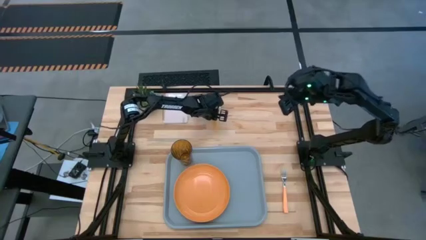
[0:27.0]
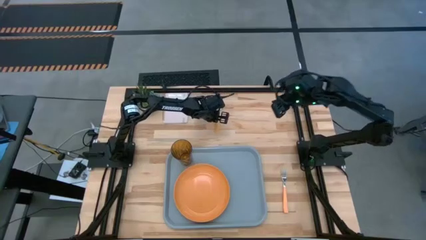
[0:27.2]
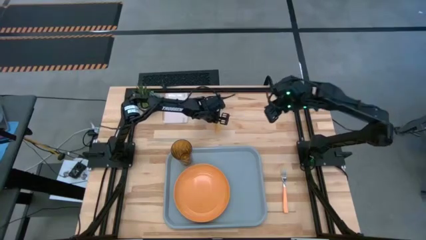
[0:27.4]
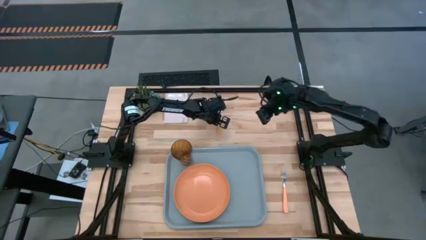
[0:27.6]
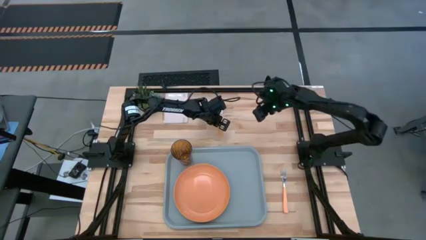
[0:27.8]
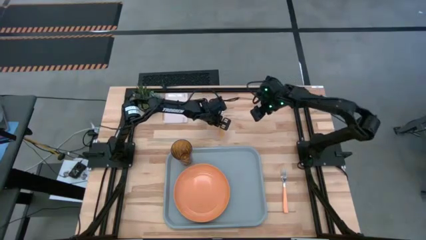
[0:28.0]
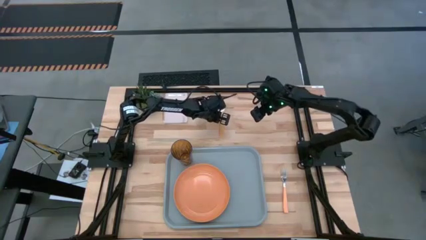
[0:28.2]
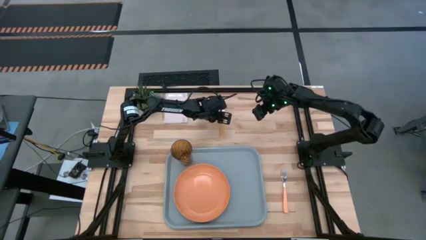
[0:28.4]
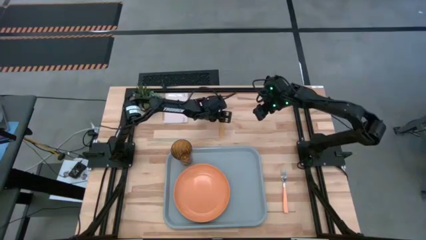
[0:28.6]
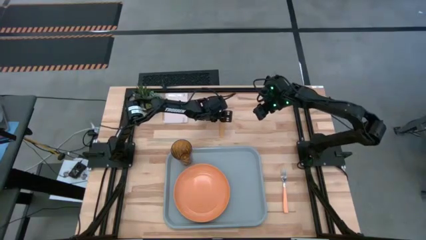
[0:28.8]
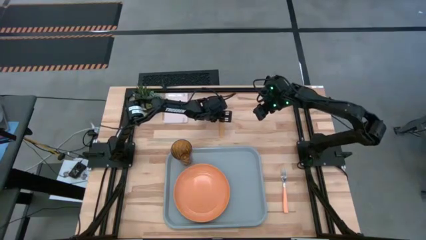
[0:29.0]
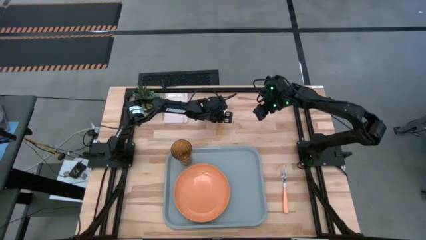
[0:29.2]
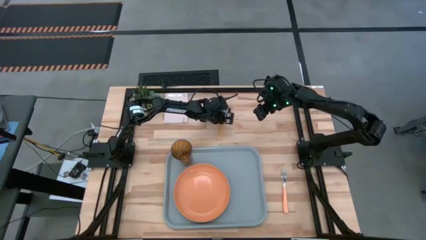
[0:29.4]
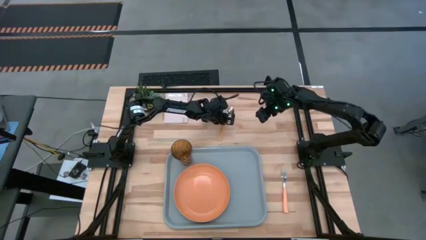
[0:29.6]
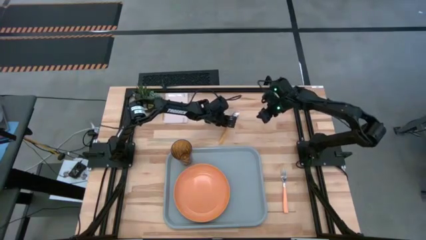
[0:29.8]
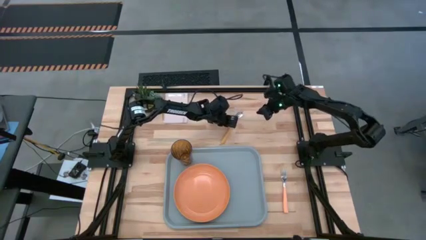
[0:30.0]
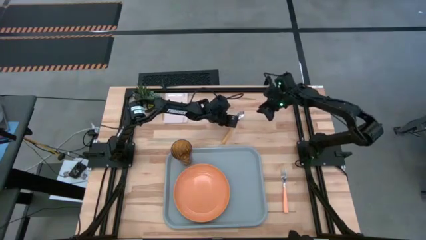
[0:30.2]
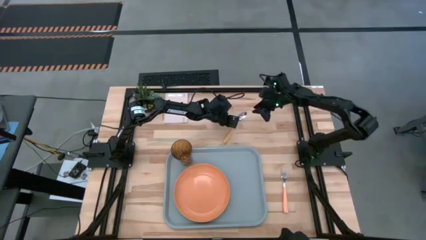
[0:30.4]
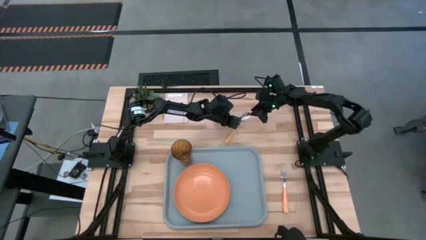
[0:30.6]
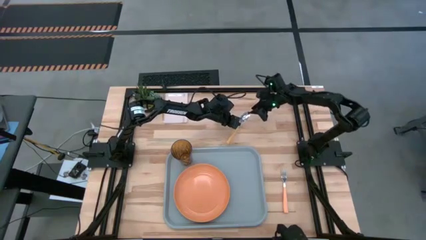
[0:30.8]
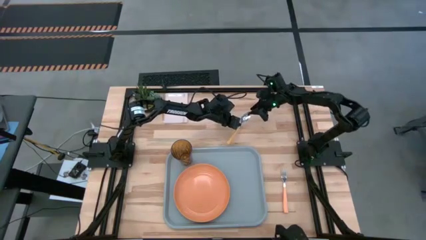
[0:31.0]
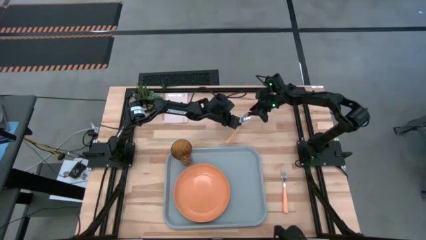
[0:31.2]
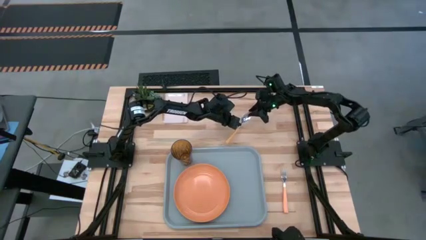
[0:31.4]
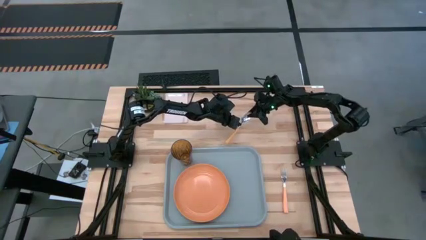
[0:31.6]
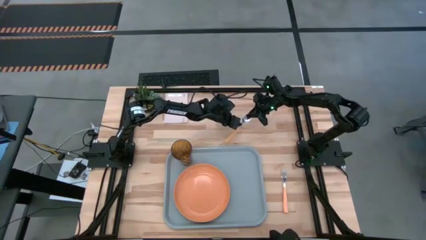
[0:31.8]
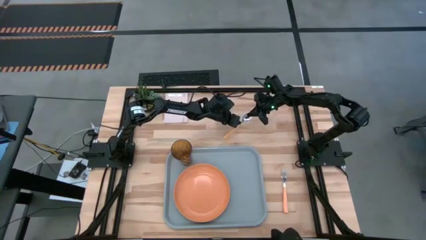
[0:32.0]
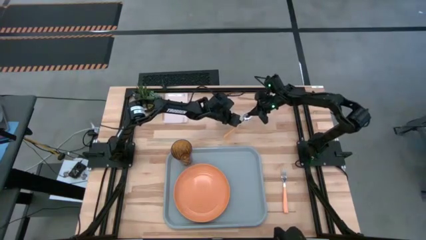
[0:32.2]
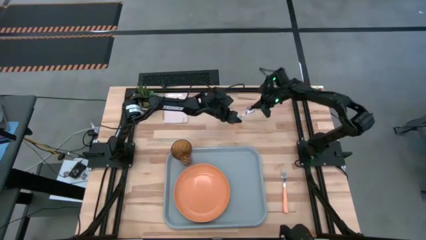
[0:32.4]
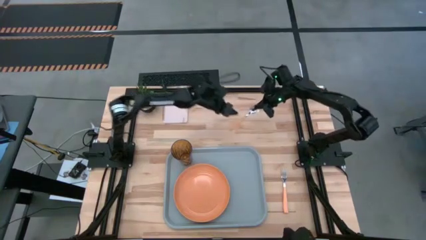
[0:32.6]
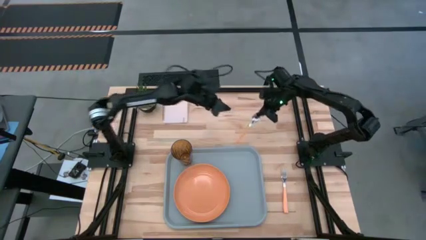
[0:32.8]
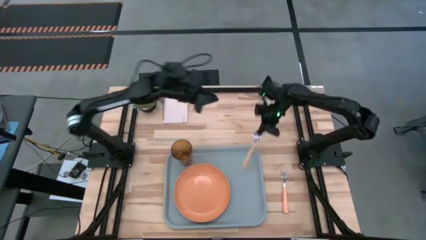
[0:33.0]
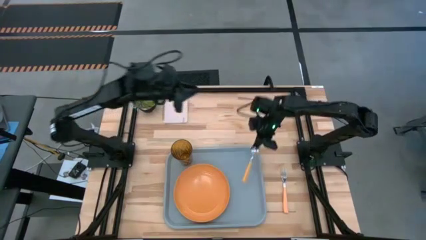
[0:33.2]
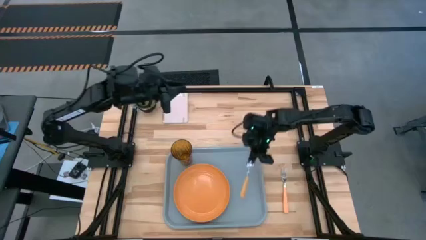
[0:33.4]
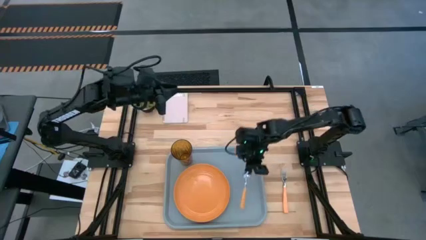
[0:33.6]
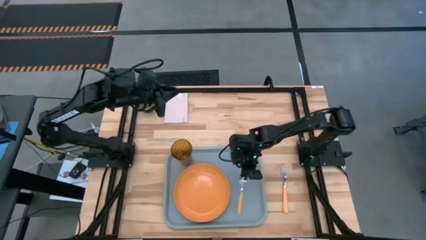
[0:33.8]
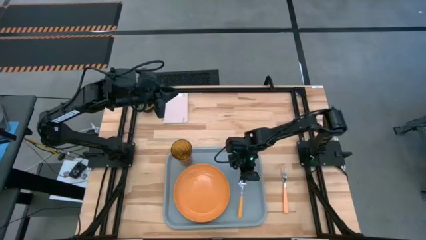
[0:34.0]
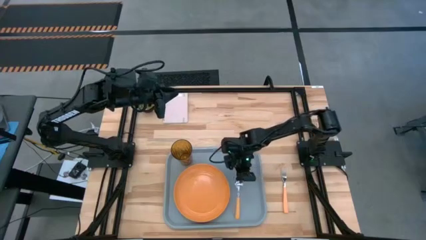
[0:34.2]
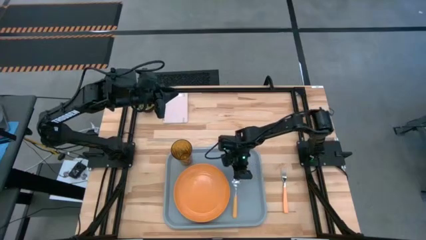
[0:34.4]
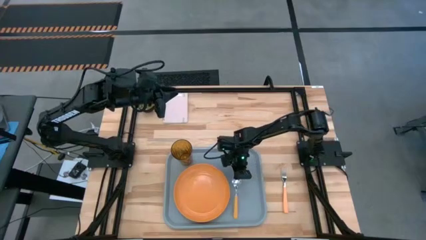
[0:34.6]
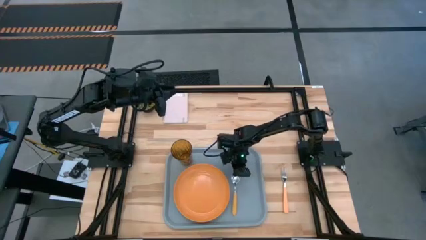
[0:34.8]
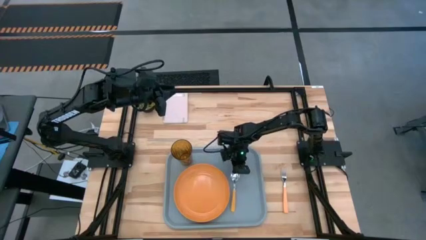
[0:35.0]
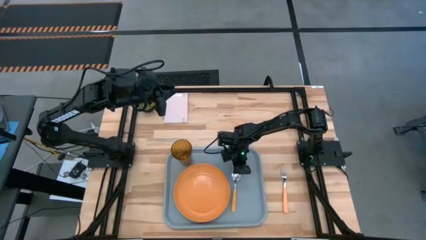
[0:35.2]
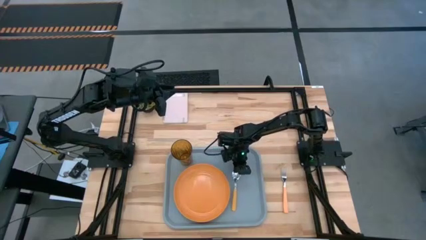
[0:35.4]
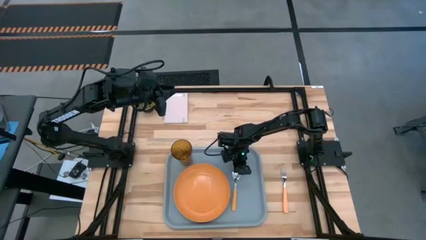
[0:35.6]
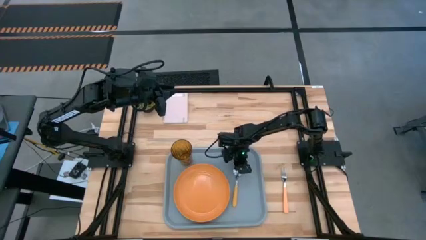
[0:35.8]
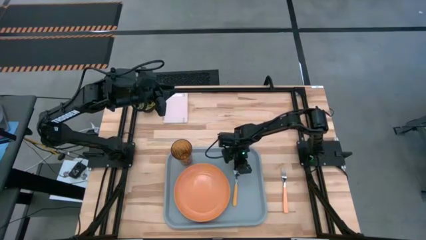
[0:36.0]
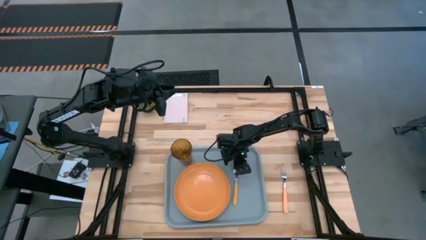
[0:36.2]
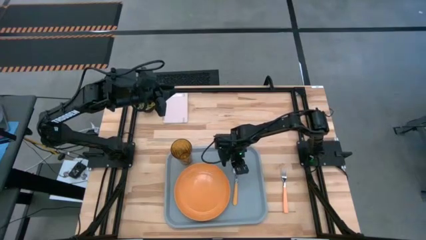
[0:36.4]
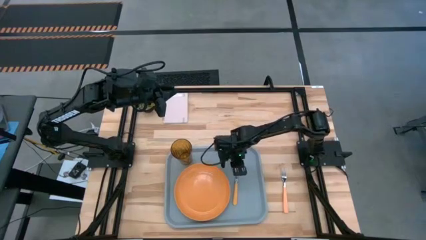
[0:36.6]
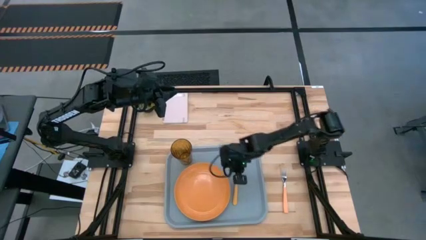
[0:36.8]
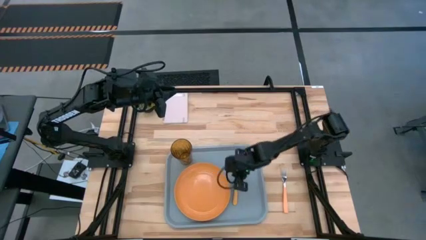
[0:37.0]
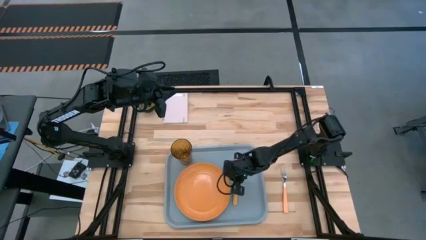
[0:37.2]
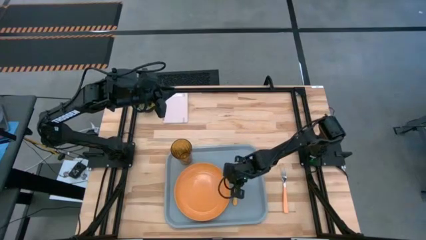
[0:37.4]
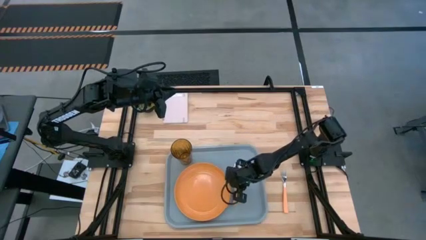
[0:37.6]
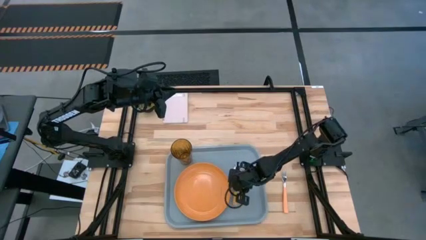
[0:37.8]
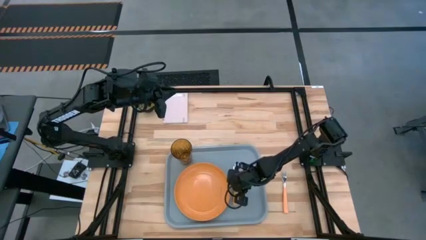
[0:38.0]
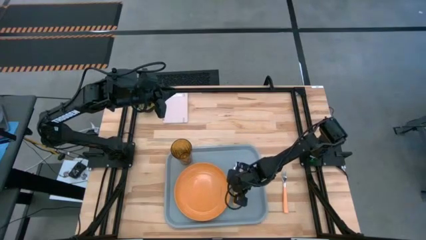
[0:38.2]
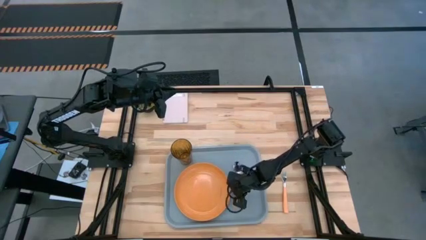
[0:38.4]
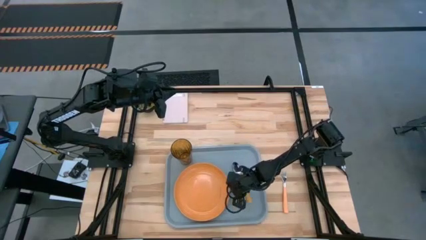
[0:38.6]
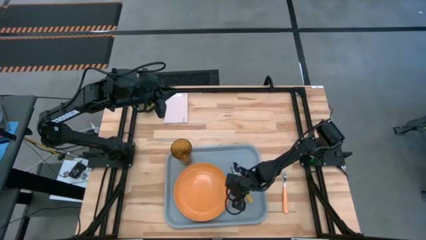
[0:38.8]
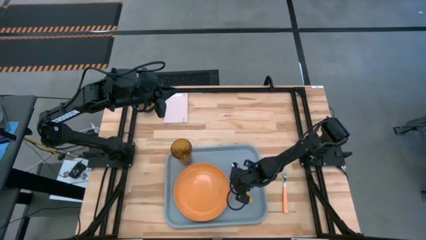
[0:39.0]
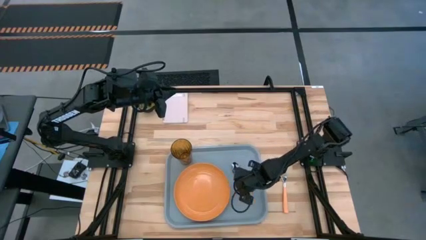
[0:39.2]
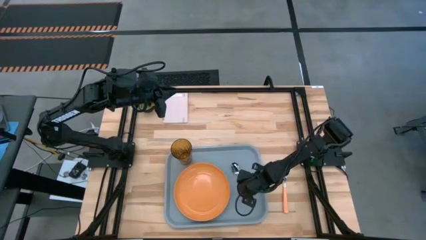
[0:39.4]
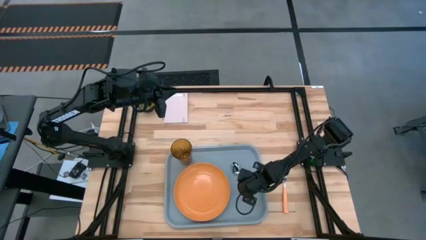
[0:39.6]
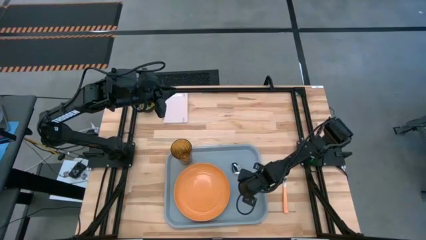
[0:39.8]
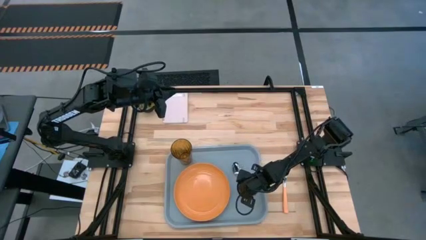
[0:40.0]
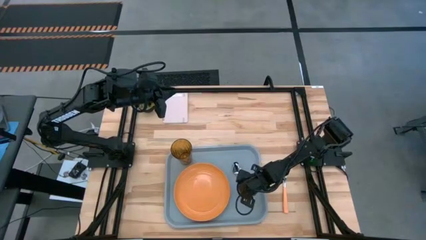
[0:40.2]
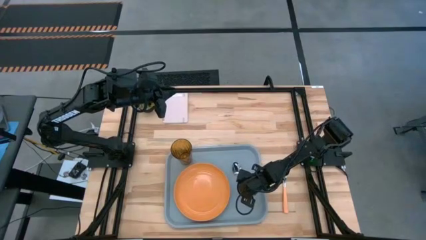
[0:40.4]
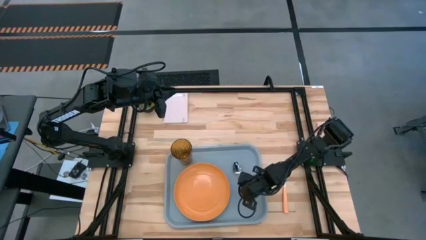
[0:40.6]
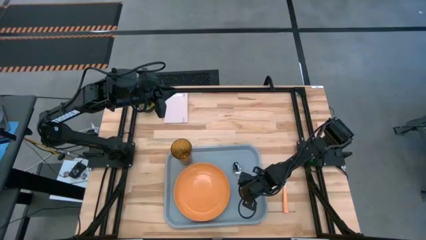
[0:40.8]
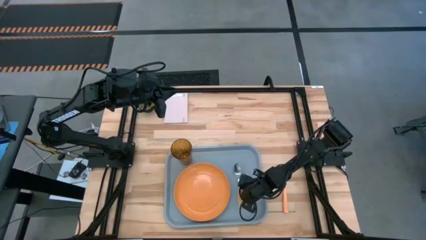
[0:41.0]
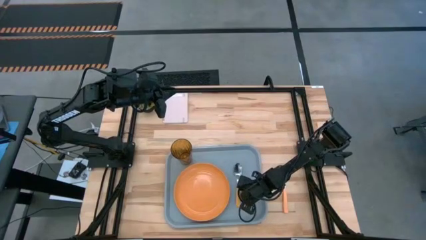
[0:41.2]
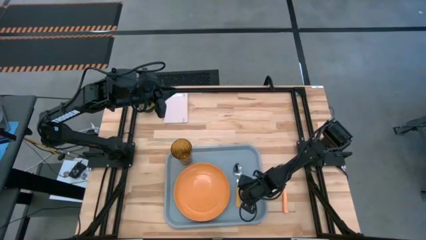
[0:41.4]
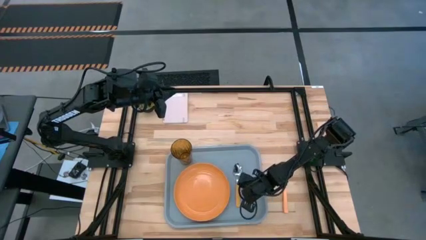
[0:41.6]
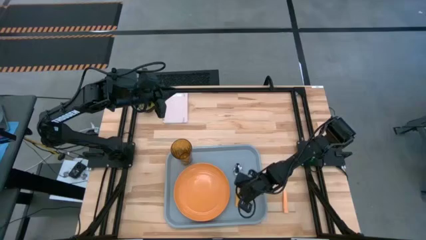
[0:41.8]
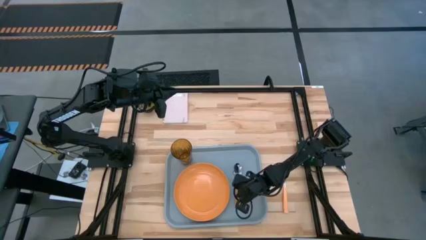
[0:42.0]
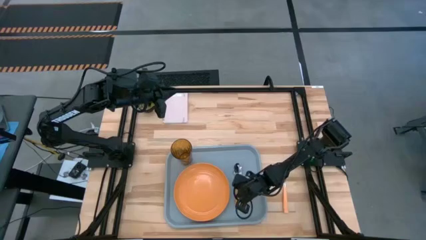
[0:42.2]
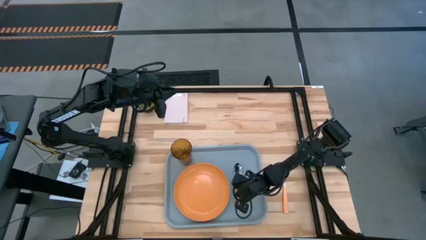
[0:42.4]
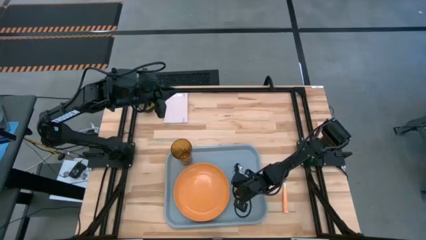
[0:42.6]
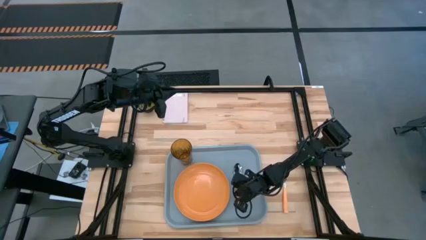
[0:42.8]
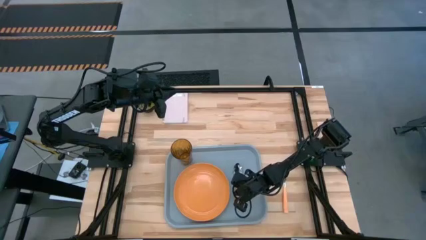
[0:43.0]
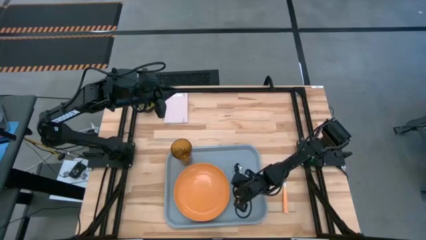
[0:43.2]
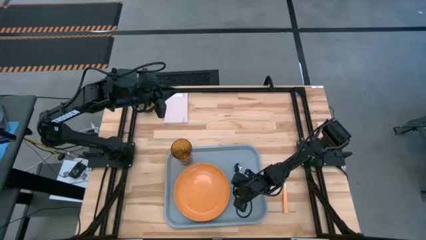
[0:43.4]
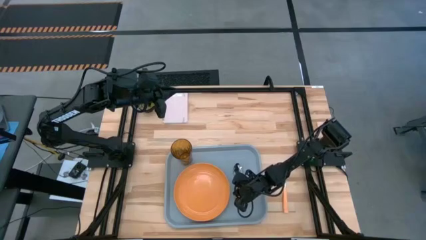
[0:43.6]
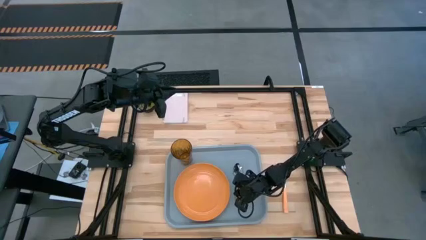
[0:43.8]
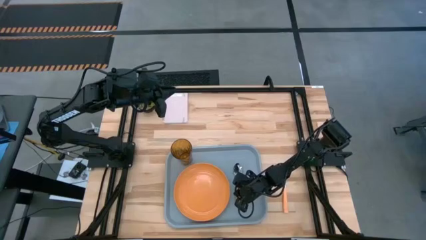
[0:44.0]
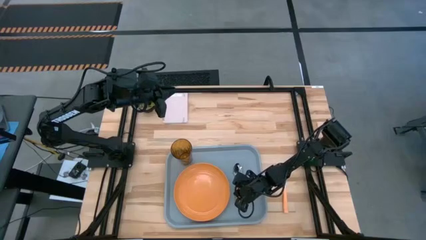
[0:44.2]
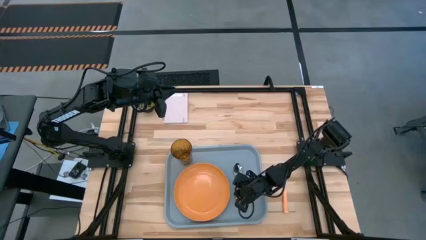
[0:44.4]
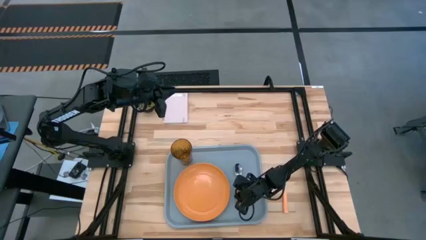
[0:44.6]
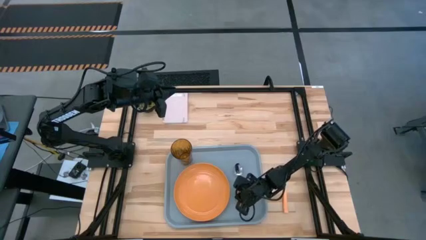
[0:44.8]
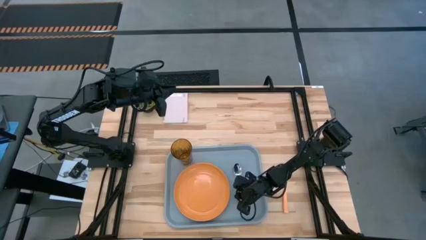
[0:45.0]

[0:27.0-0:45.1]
Task: Pick and place plate/cup/fork/spoon on tray
Put the orange spoon on the gray tray to the right of the orange plate
